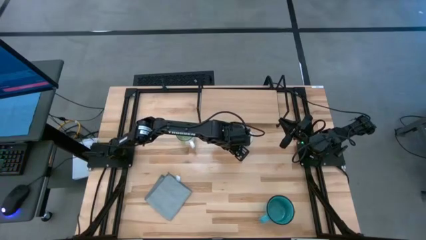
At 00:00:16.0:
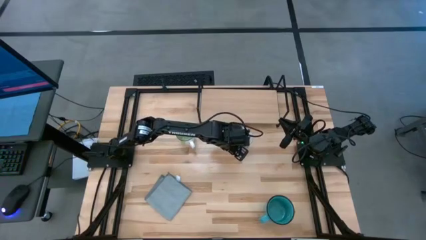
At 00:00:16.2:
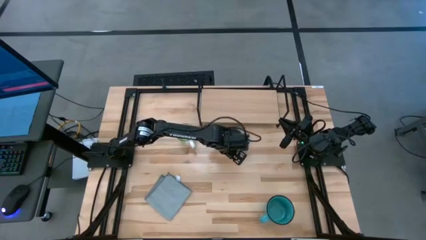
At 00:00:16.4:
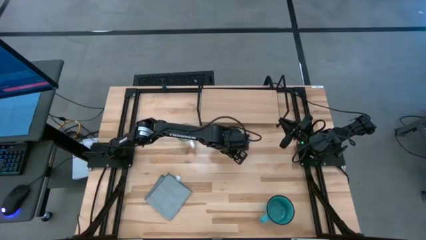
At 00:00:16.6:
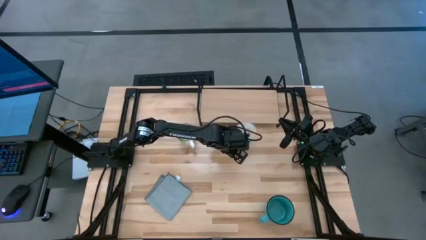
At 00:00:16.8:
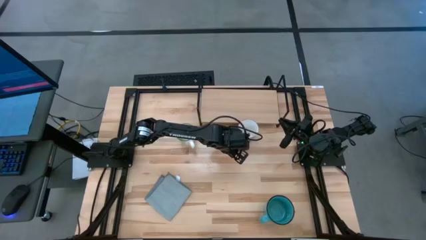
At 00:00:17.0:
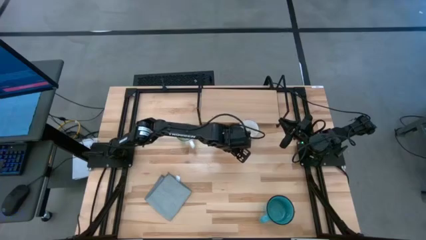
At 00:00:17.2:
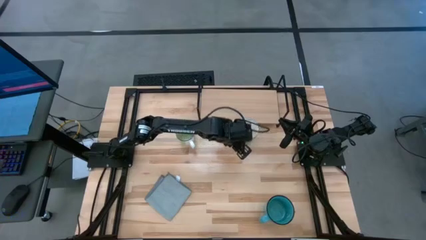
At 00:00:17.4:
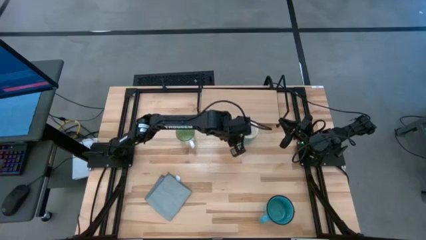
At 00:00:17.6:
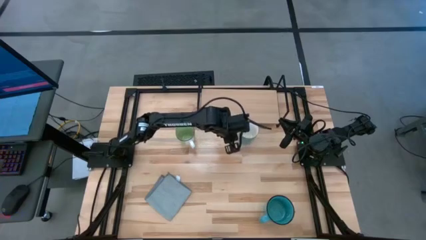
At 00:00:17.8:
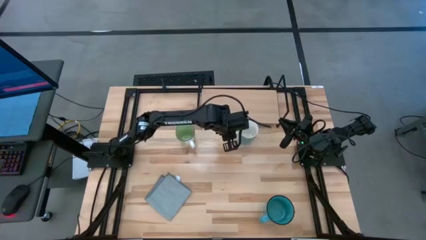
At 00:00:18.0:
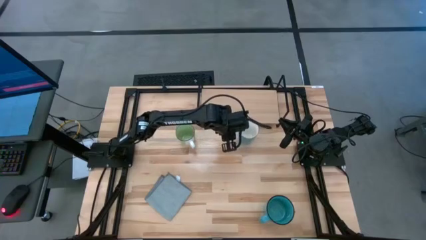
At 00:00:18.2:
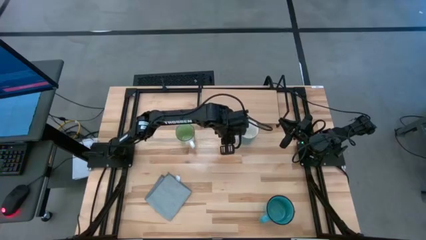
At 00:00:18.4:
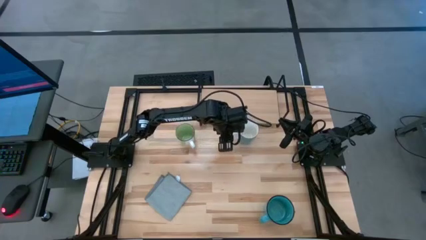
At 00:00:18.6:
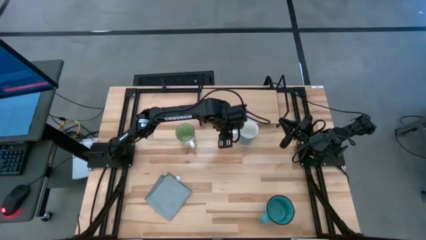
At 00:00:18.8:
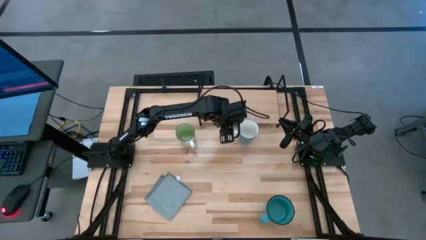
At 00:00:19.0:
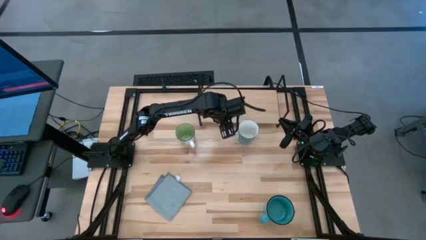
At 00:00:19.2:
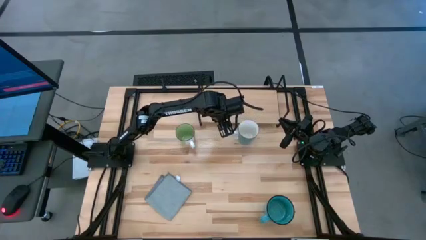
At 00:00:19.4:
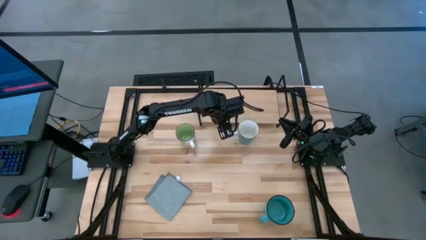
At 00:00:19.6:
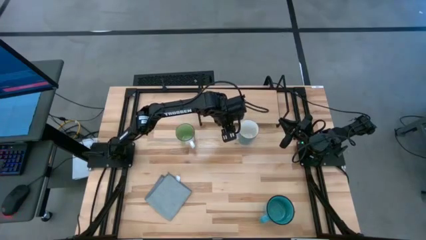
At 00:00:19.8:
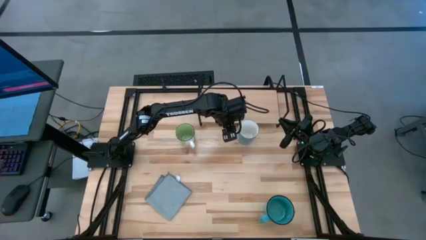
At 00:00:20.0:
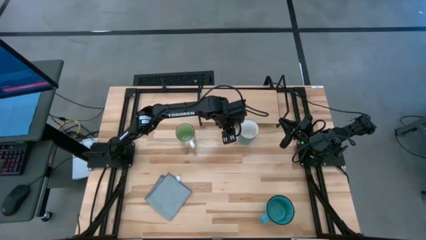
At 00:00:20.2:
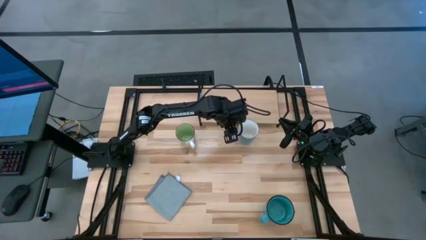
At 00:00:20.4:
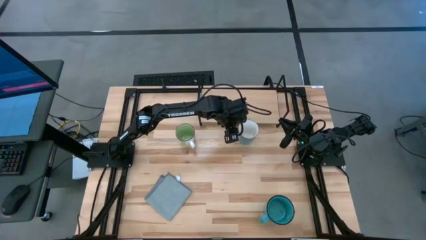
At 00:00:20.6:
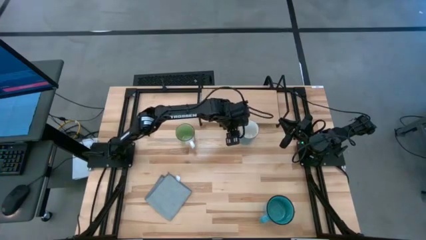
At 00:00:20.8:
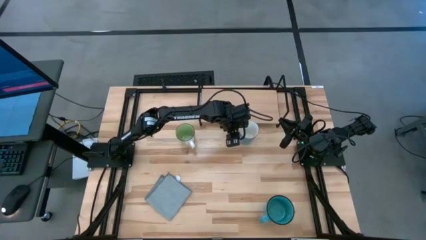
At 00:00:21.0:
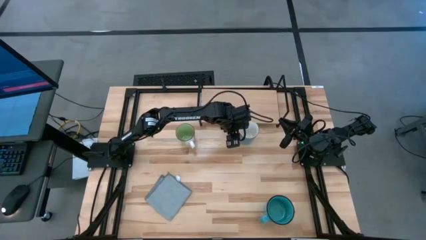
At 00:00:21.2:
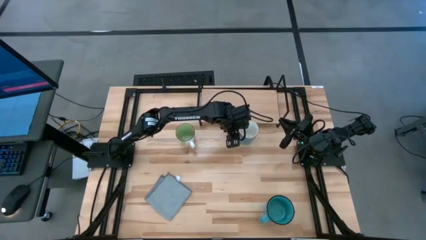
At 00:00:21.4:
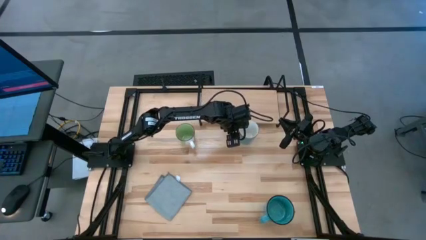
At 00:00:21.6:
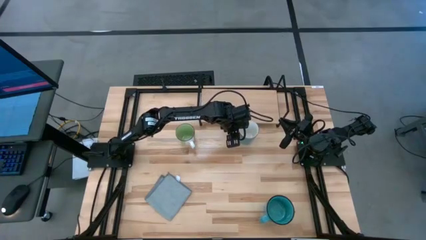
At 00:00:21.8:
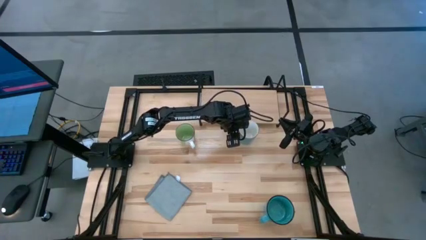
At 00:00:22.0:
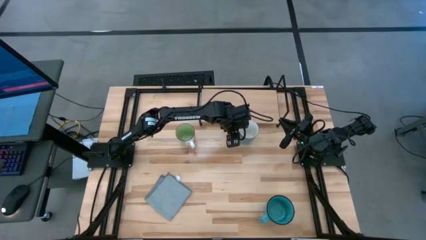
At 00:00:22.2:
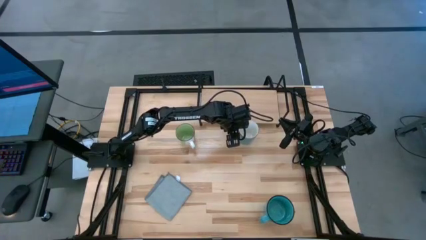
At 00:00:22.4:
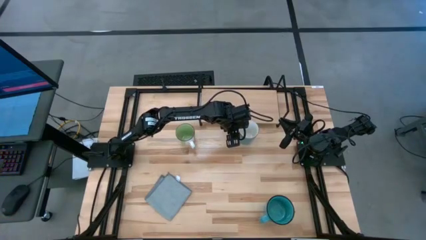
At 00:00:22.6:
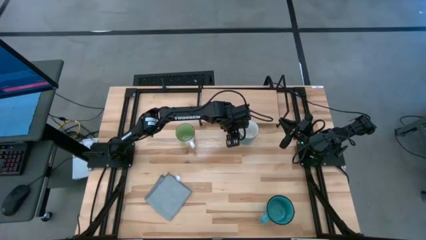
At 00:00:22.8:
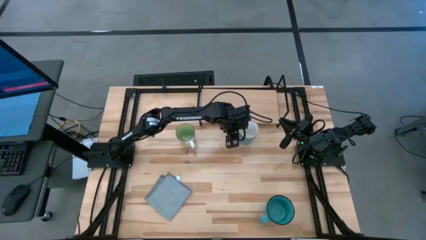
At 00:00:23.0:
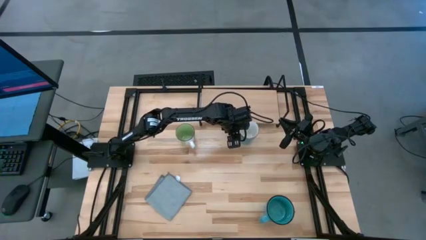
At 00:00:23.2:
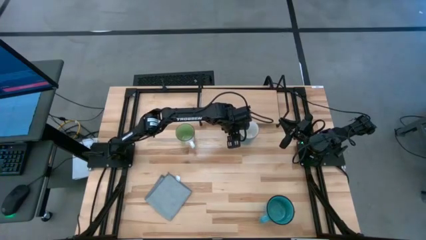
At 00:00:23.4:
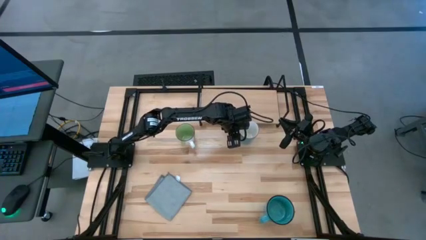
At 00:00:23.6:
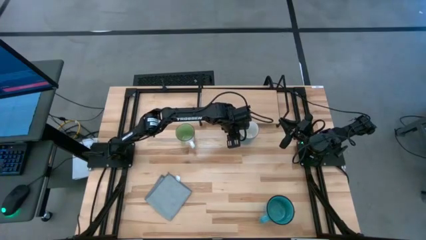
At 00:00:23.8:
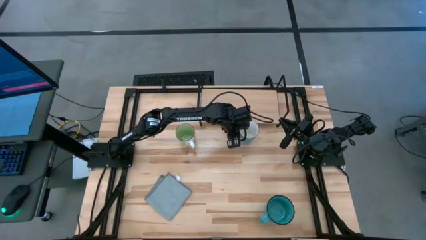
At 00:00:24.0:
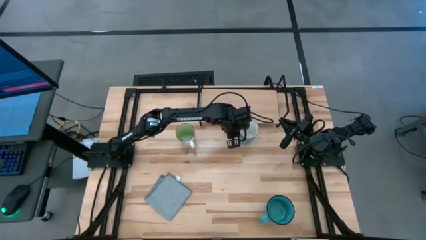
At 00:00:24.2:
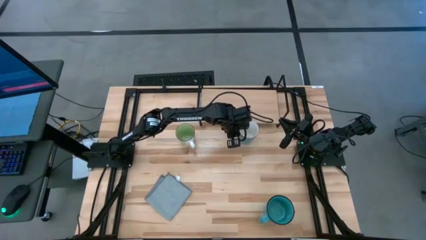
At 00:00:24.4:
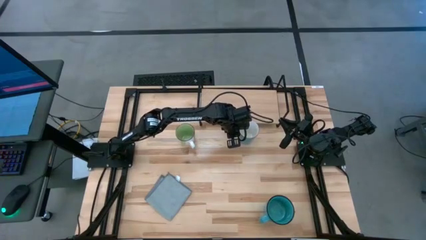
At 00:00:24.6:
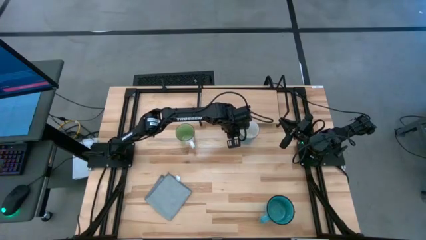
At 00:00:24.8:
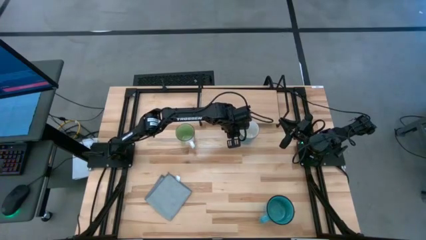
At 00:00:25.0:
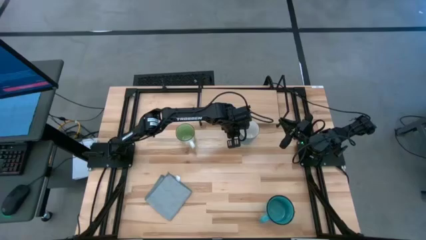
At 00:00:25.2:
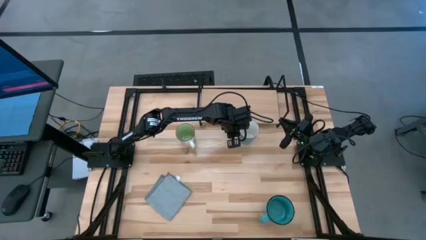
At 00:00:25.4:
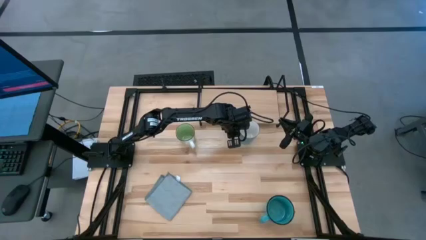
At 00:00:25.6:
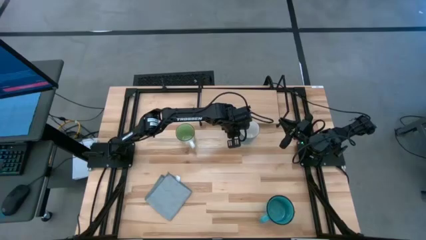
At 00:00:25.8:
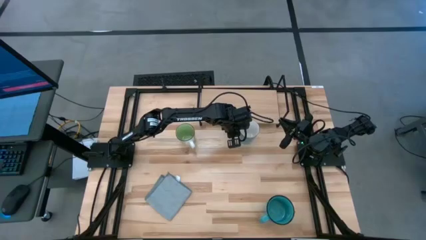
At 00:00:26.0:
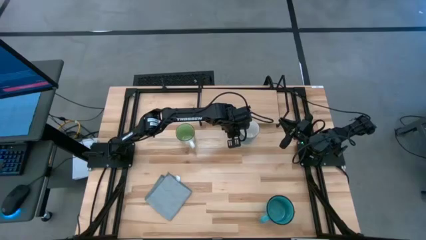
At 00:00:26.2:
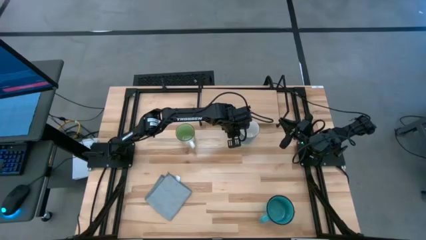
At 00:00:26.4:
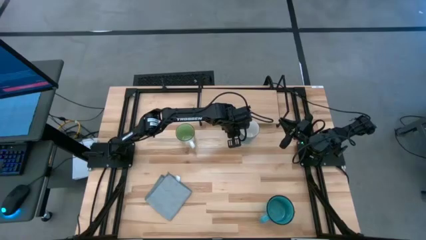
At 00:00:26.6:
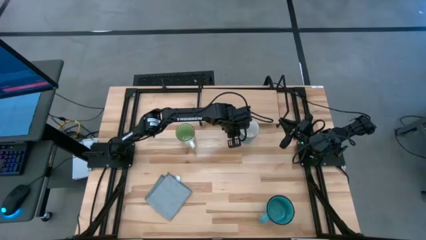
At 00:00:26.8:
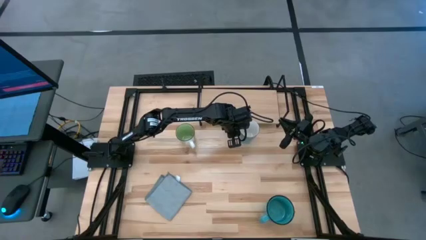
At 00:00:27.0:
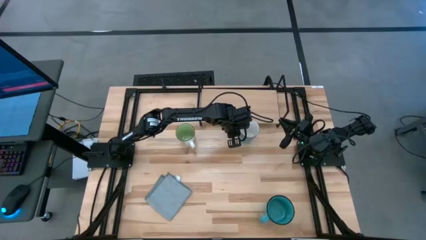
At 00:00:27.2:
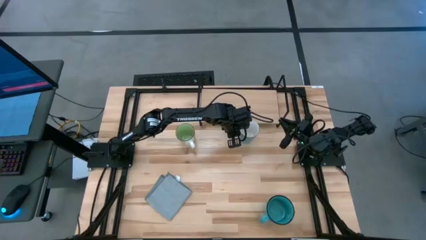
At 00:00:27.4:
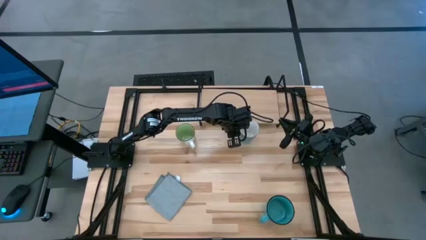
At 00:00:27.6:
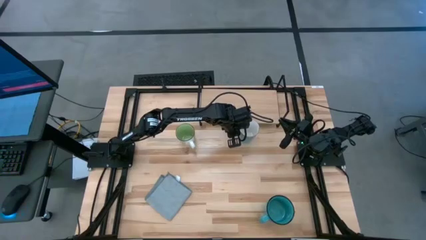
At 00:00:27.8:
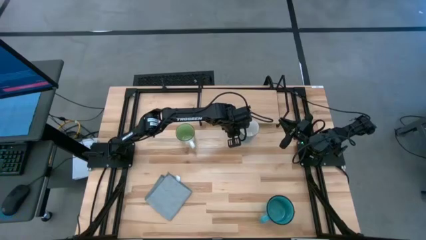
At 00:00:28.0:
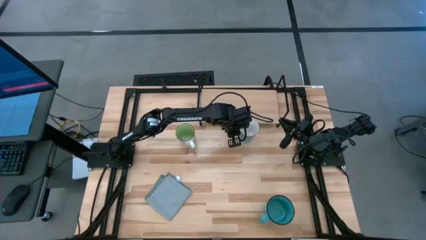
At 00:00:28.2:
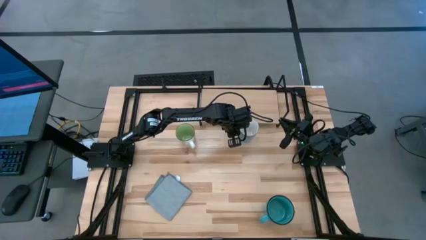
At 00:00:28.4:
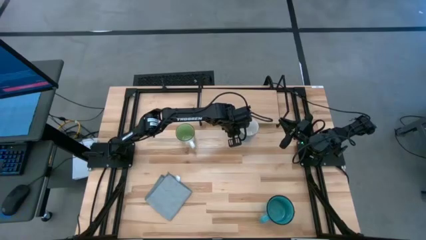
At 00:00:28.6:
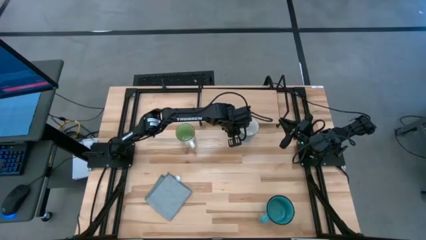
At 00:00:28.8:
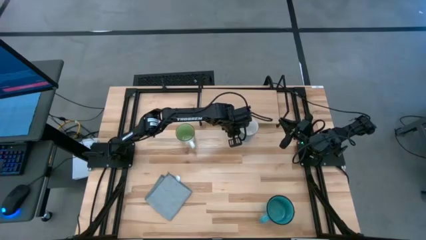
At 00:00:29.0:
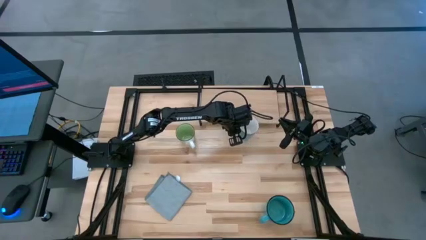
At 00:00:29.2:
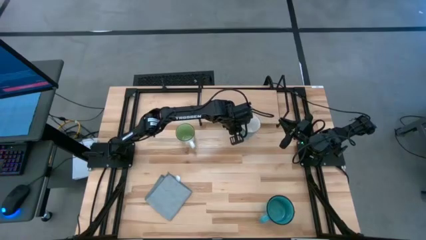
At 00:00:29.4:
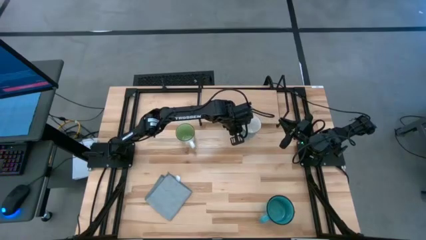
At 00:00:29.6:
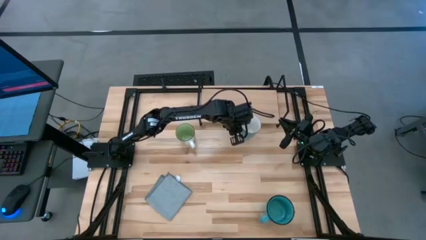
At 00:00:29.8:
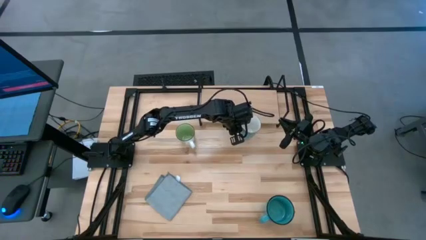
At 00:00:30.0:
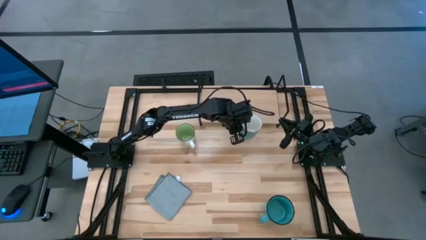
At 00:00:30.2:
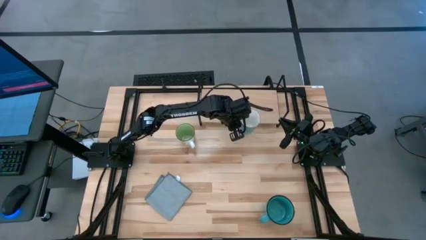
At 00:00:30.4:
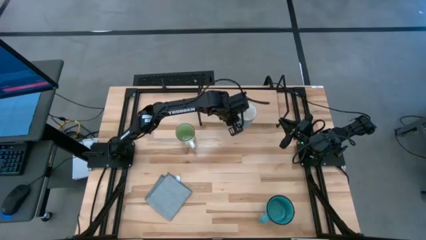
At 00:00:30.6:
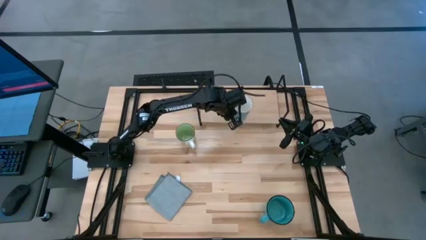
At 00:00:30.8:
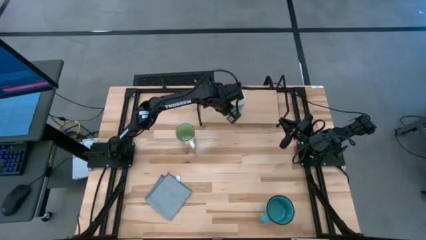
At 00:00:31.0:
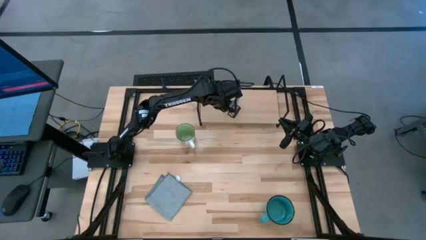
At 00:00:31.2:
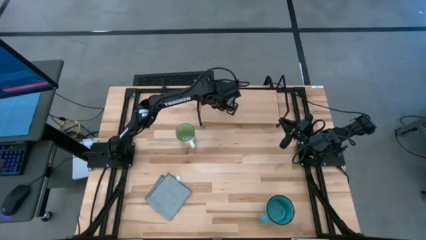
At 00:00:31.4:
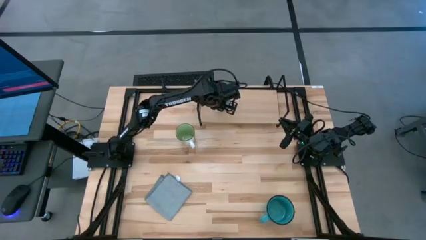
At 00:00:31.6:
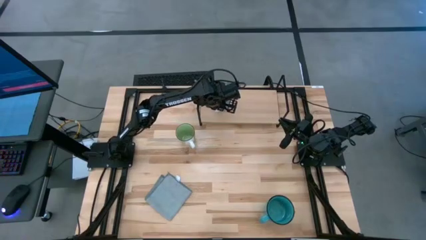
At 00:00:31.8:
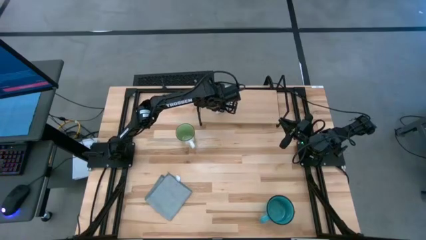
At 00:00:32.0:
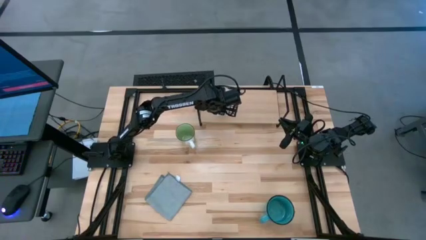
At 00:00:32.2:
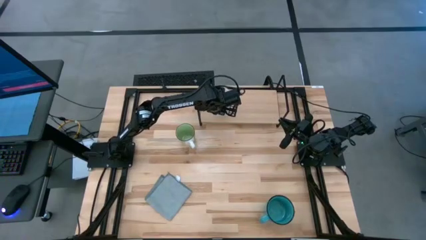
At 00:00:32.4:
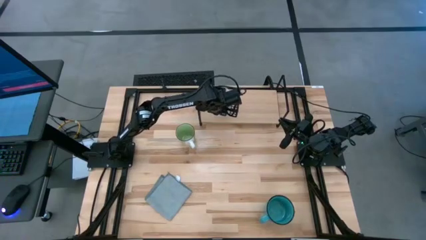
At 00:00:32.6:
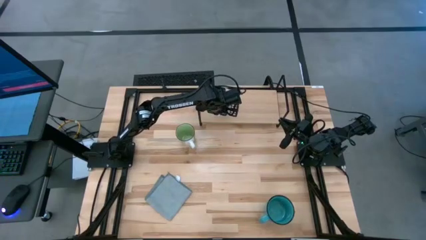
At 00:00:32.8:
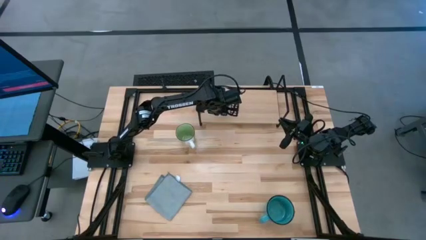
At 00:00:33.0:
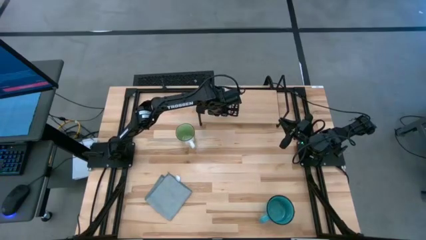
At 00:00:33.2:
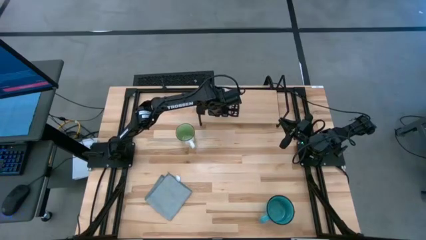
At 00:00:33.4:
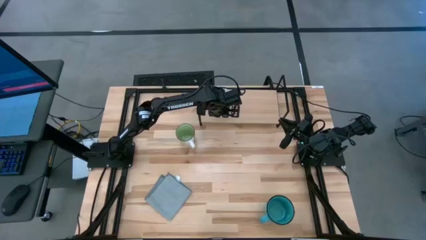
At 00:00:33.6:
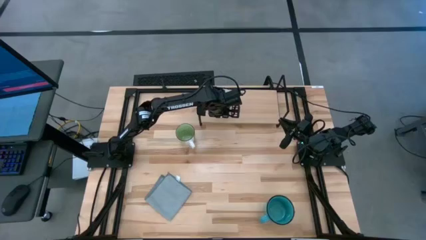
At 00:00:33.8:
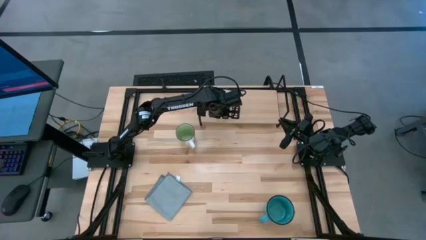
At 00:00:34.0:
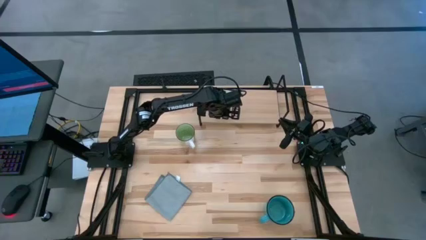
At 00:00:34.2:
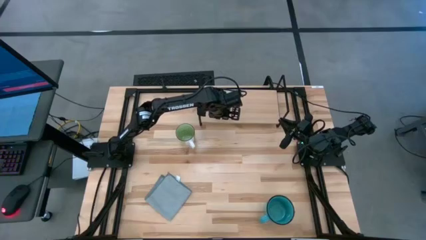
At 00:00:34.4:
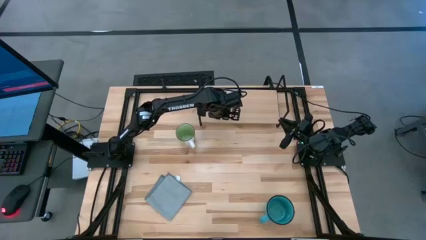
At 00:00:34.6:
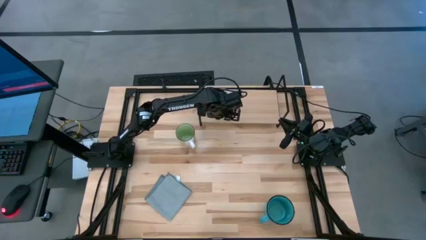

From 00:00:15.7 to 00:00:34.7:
Task: Stack small to large cups/mugs on shelf
Put the light blue mug on the shelf
